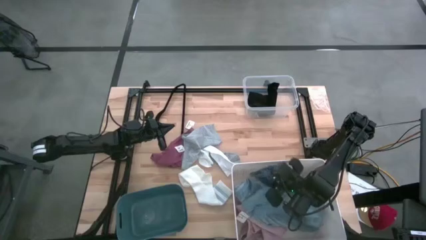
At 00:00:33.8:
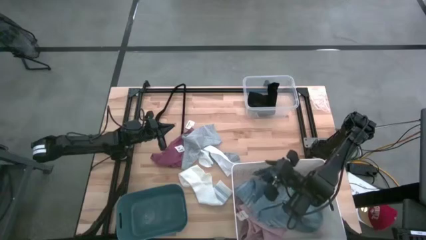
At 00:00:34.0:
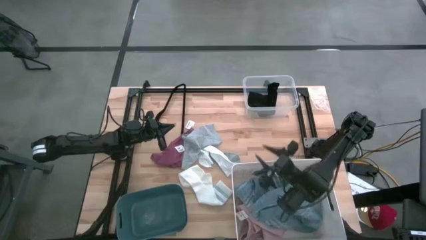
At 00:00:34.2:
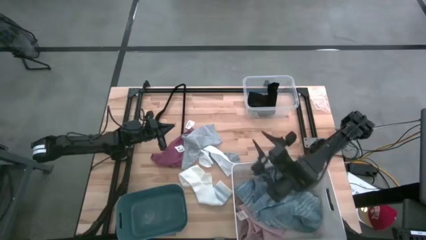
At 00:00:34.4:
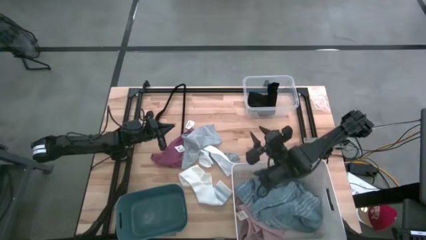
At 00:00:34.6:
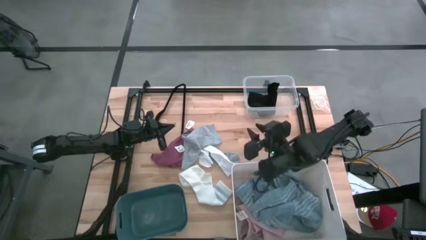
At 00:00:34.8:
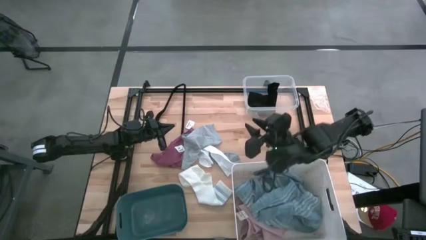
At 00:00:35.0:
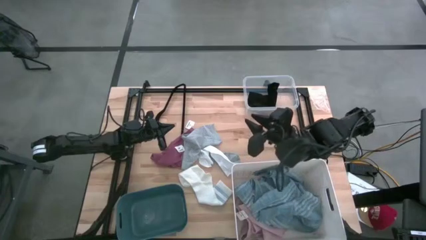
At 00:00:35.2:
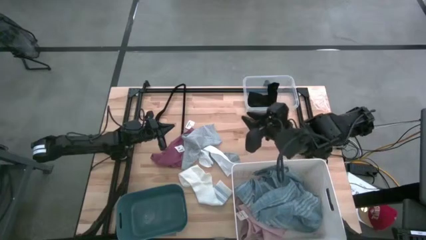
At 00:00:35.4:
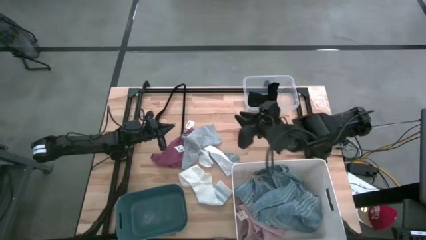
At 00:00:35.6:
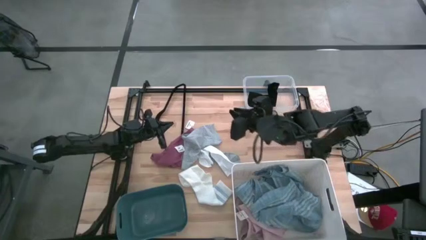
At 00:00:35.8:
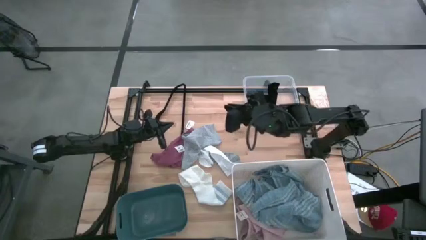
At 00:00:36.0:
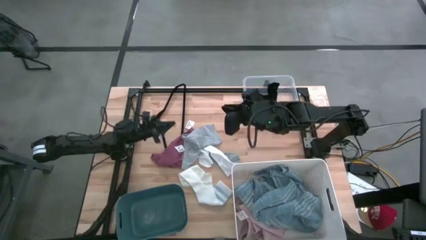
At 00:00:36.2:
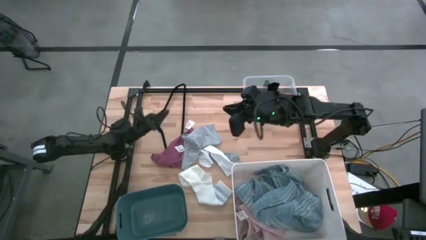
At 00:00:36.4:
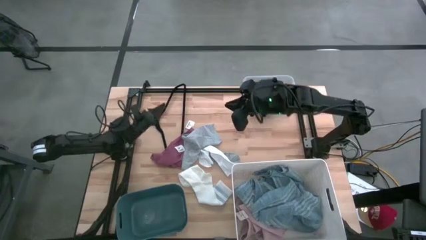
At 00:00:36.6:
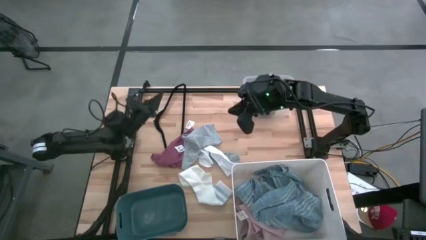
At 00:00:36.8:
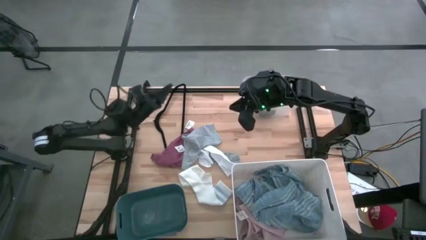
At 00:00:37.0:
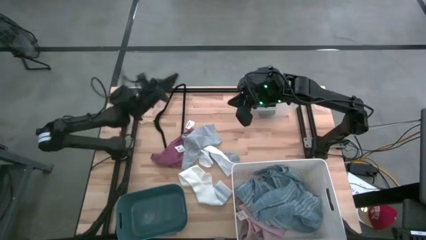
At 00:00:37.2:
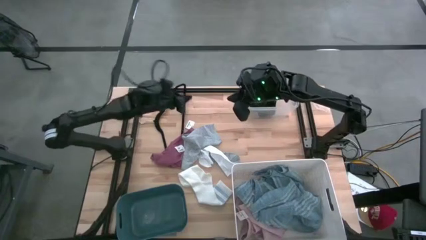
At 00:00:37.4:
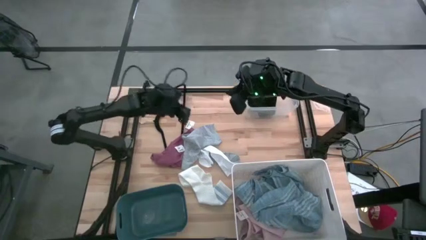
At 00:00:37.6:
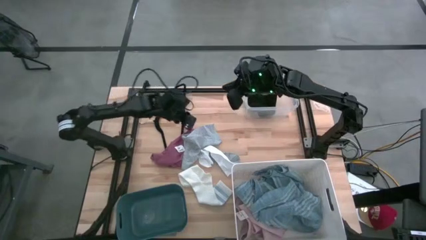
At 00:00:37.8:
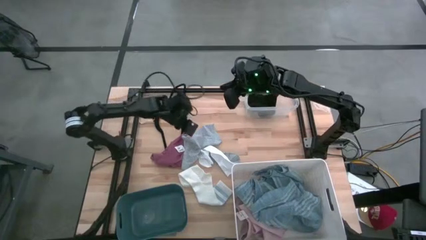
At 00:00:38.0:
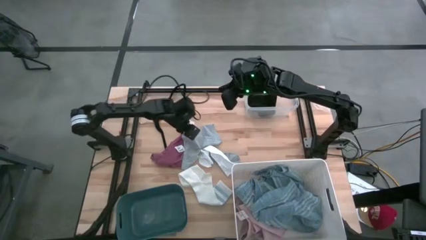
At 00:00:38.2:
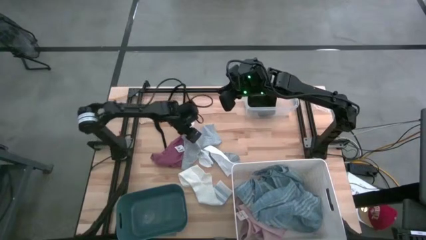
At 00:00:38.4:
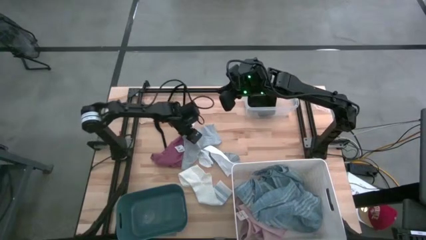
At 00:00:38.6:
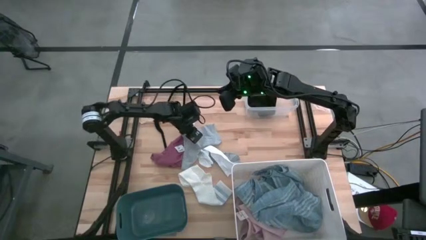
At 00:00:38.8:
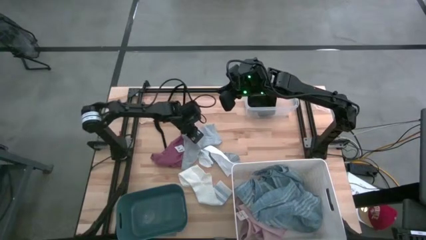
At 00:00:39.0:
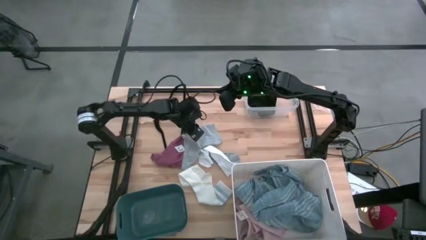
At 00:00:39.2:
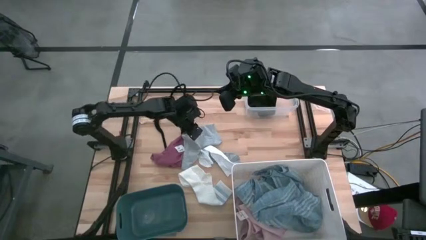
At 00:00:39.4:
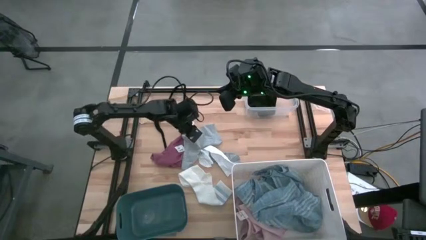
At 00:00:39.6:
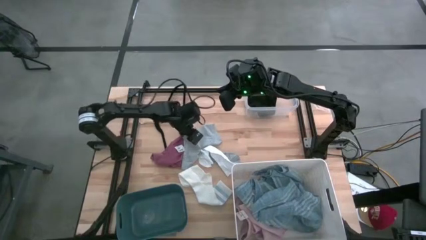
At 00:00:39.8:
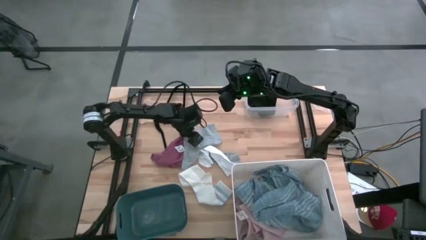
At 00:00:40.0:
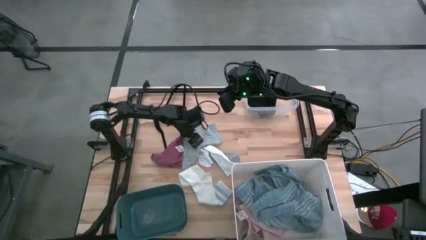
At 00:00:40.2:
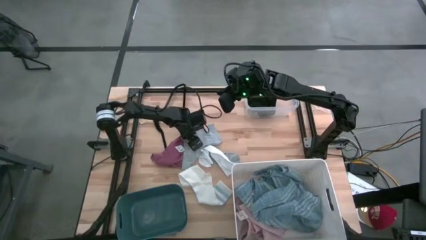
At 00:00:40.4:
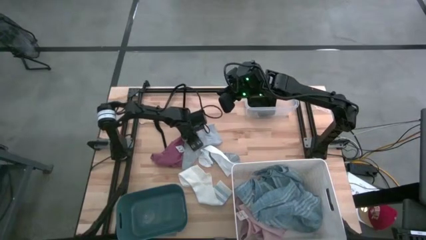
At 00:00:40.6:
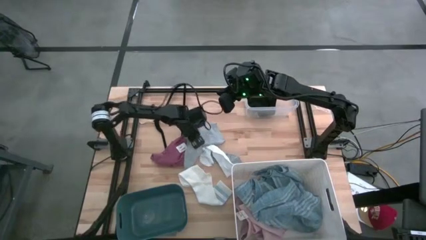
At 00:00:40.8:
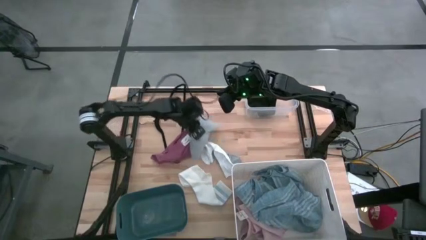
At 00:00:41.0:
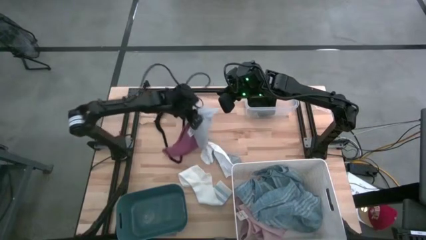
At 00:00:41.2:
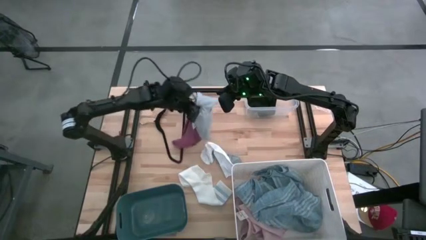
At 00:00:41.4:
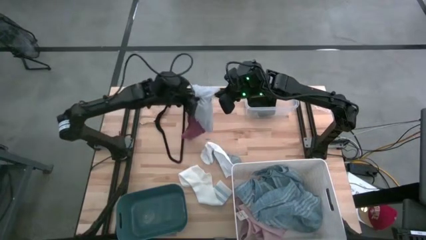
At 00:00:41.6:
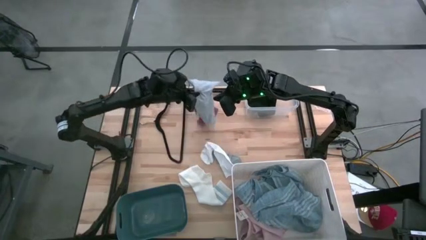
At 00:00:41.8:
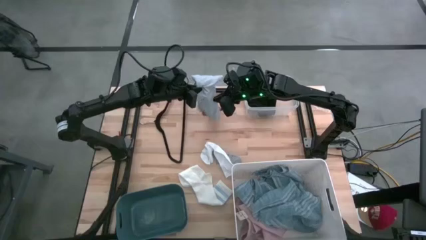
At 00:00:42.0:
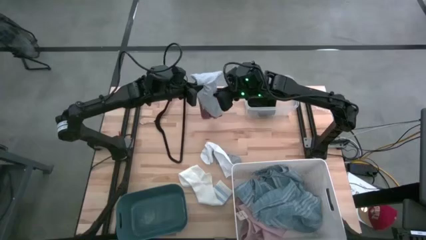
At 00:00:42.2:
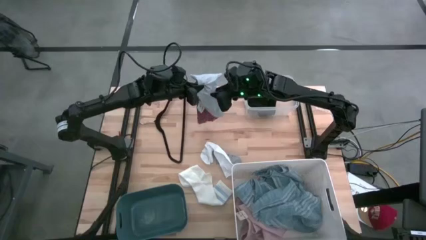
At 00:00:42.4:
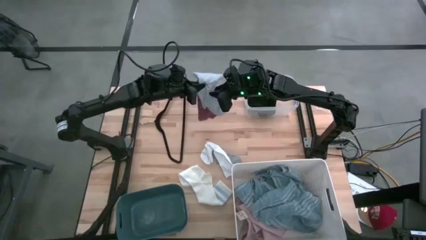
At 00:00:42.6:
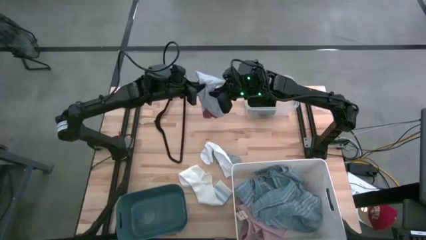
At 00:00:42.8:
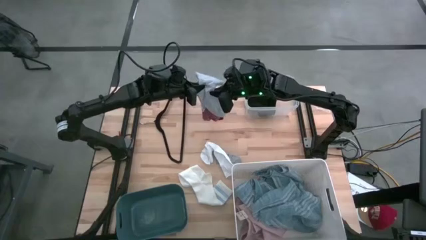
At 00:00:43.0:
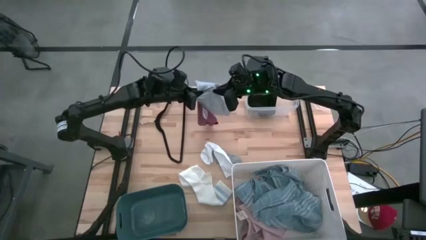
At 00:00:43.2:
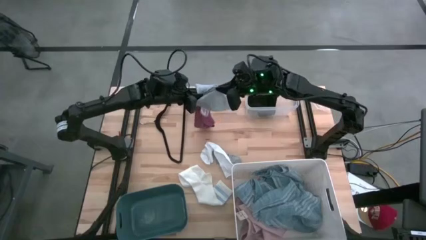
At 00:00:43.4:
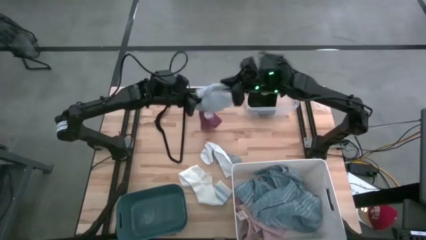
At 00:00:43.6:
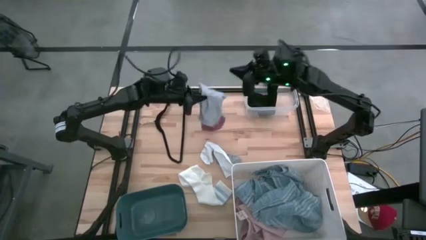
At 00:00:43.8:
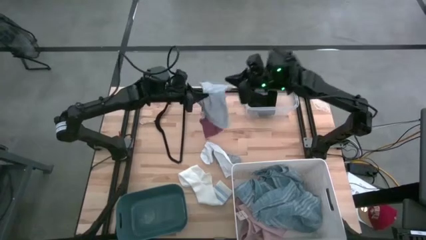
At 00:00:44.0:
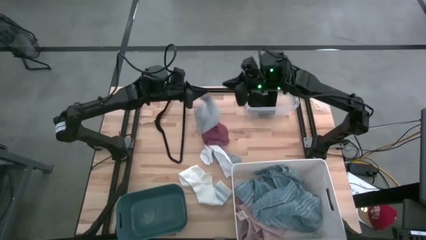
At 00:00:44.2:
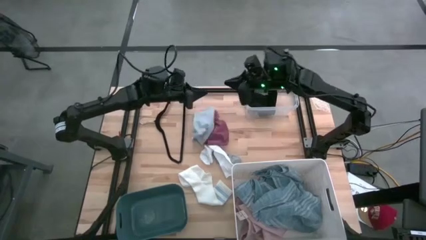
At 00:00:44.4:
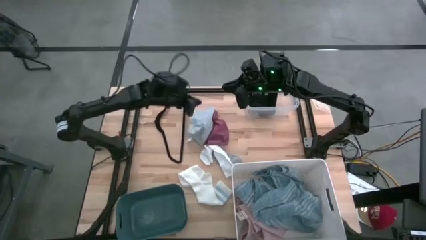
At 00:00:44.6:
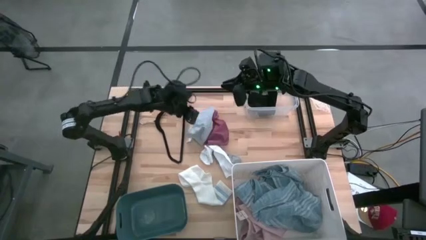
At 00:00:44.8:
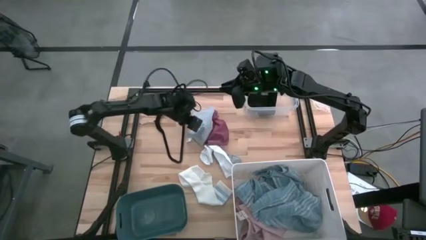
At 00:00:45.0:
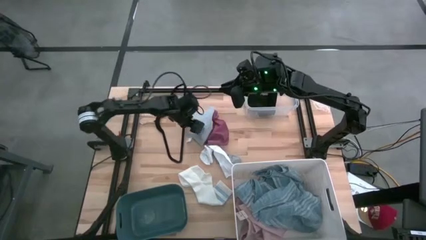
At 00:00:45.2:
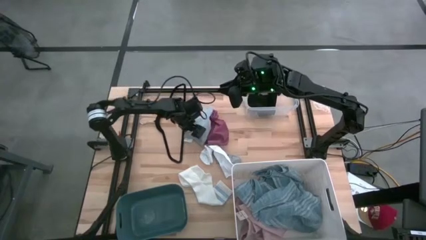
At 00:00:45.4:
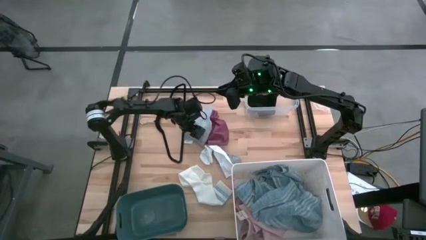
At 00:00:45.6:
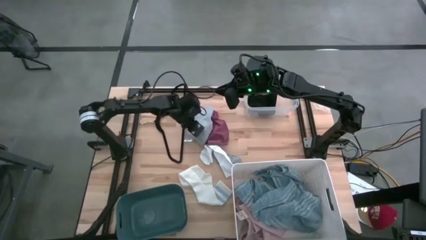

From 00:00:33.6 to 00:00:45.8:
Task: Pick & Place Cloths
Put the grey boxer into the transparent bin

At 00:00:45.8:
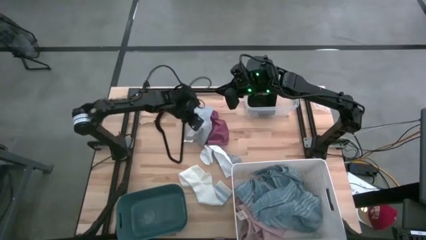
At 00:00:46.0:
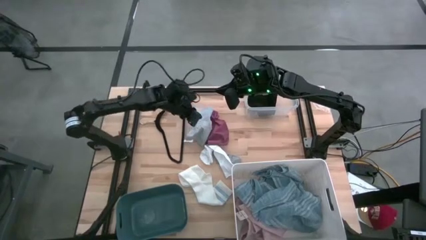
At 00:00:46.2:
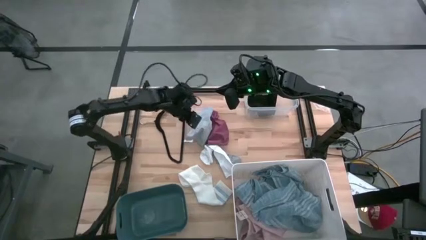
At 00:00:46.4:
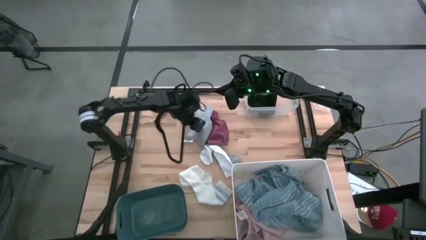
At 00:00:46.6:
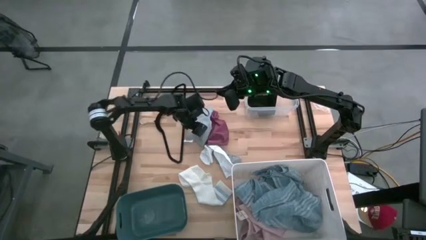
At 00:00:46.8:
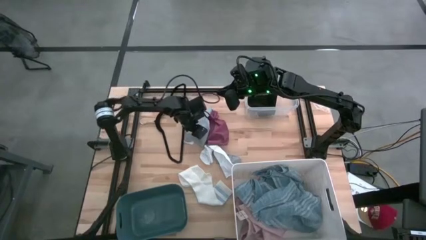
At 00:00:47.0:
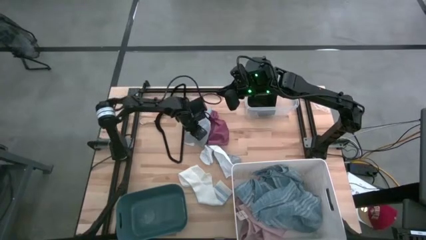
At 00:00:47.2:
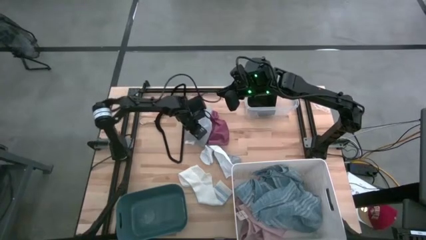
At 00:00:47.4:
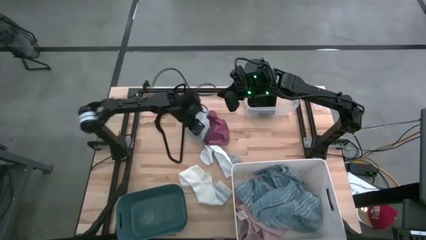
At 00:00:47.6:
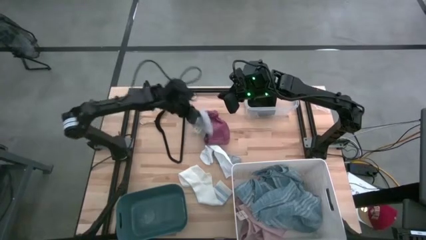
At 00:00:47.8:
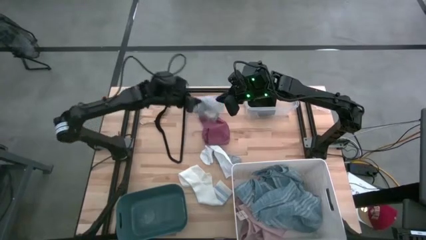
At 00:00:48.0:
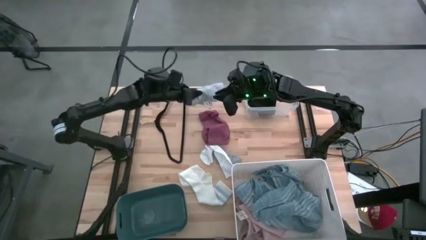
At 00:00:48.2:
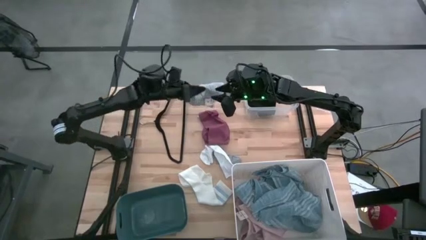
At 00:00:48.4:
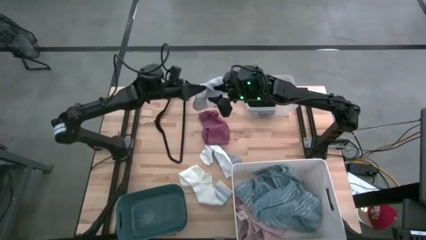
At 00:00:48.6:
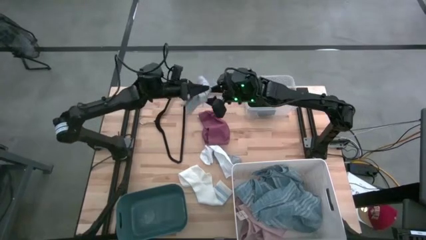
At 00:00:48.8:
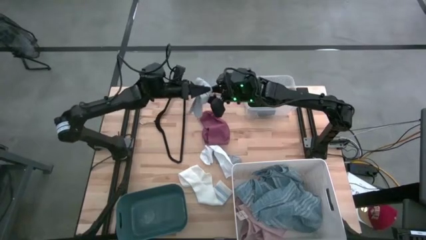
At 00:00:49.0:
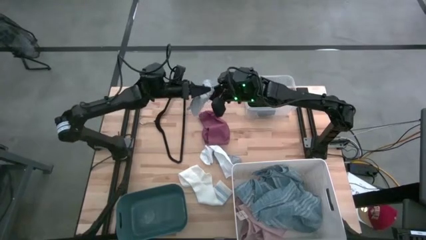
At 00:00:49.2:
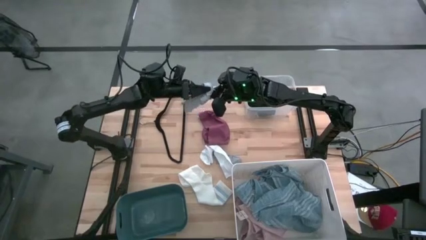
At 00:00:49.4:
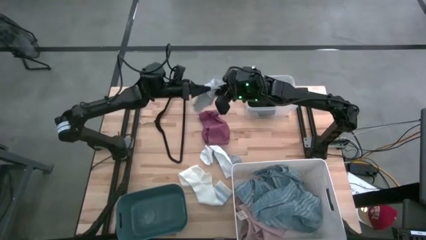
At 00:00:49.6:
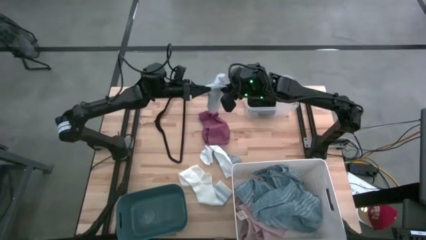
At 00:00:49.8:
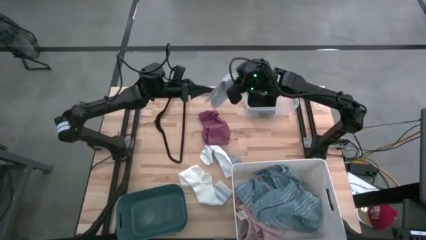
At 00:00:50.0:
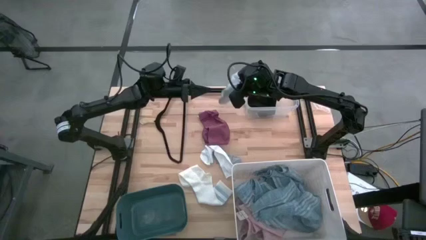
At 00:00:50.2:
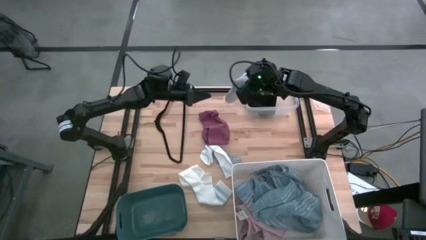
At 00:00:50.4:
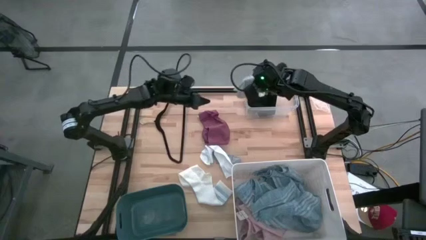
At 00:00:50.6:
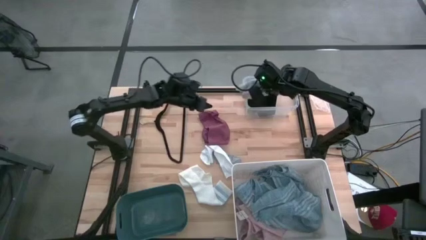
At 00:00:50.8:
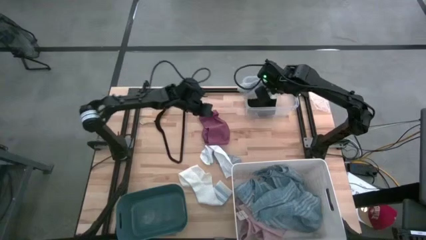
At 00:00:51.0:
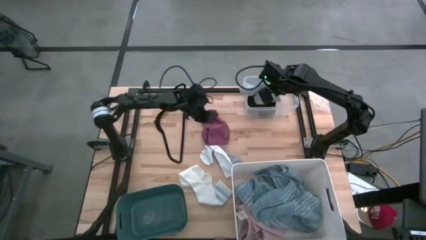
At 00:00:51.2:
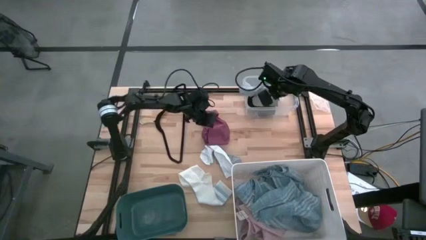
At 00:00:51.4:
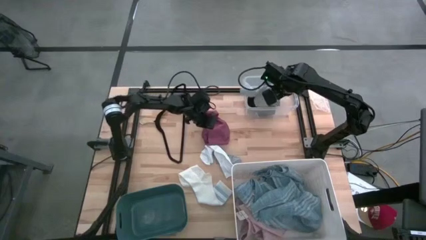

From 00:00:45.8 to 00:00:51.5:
Put the grey boxer into the transparent bin
